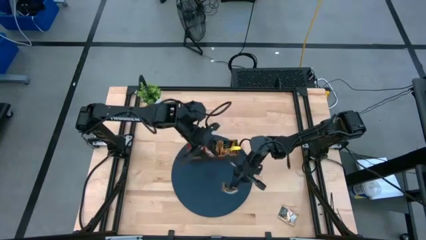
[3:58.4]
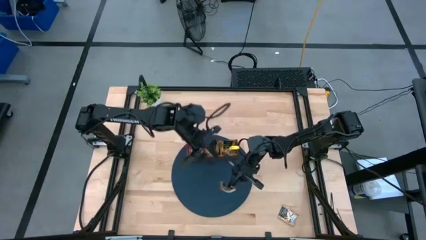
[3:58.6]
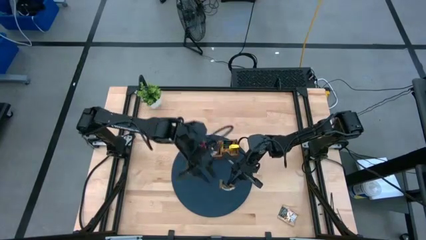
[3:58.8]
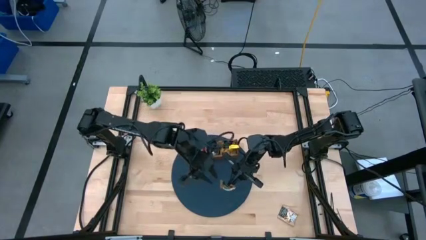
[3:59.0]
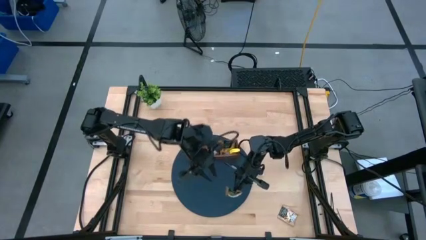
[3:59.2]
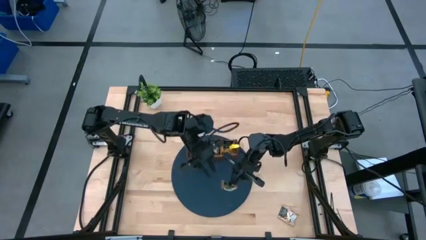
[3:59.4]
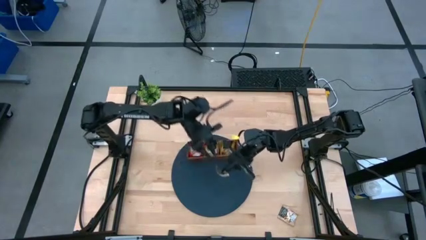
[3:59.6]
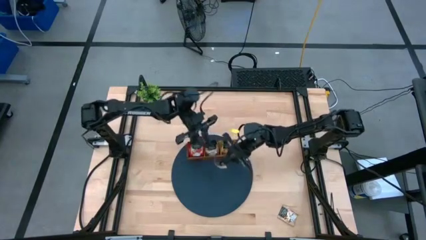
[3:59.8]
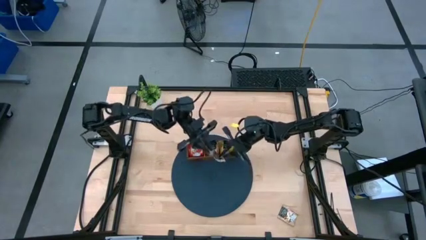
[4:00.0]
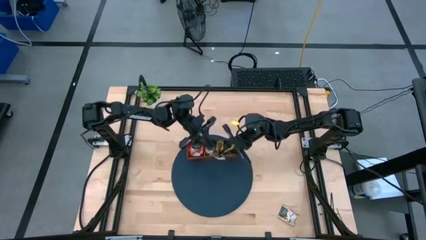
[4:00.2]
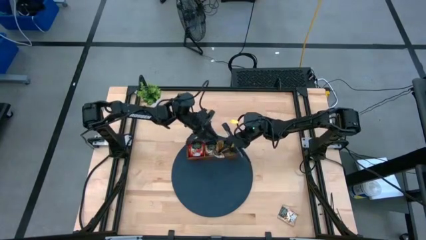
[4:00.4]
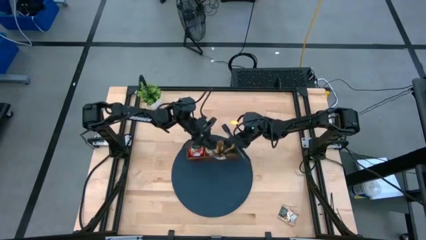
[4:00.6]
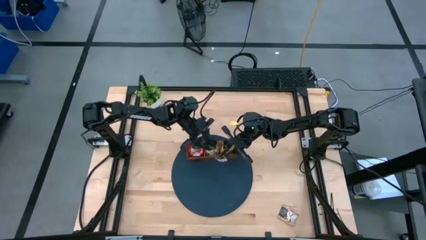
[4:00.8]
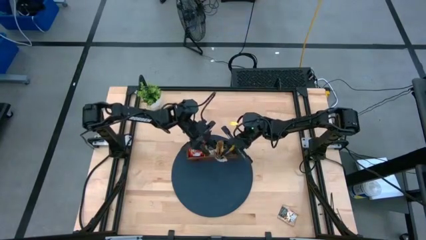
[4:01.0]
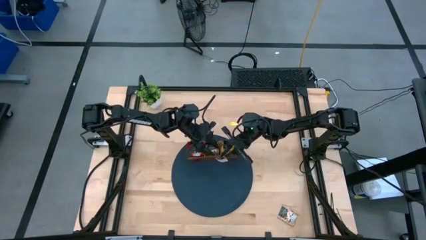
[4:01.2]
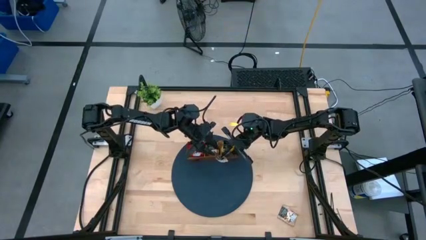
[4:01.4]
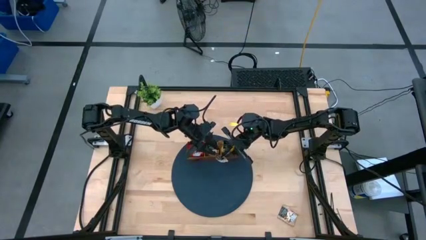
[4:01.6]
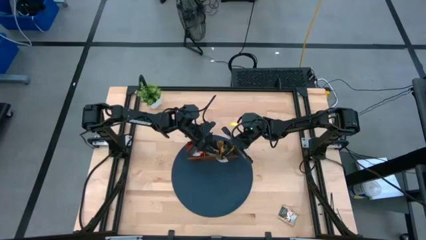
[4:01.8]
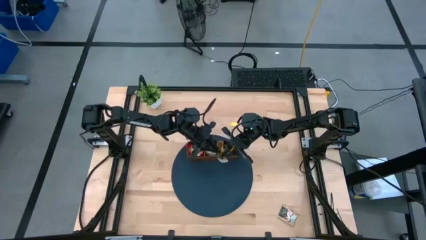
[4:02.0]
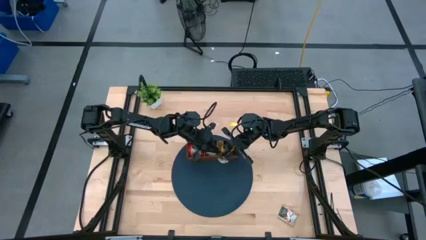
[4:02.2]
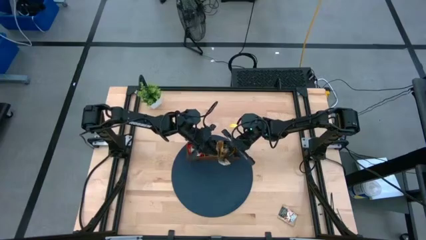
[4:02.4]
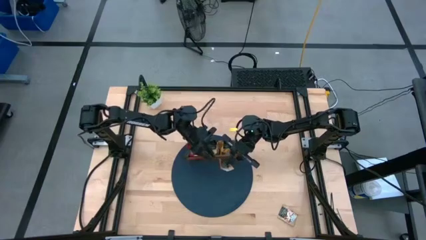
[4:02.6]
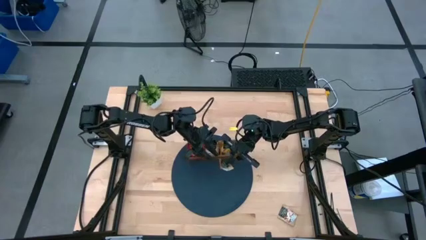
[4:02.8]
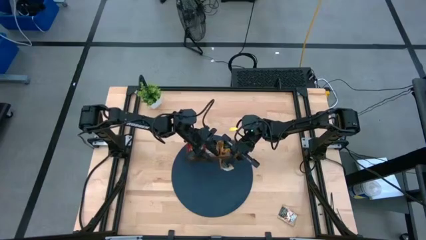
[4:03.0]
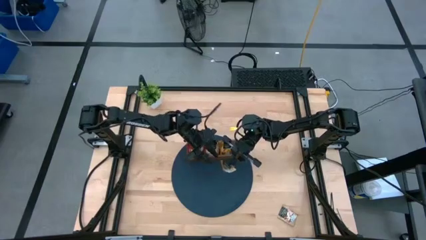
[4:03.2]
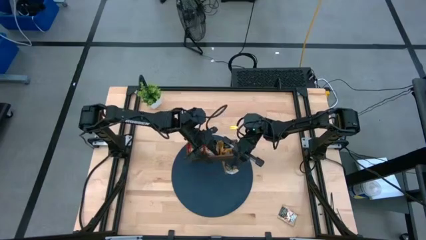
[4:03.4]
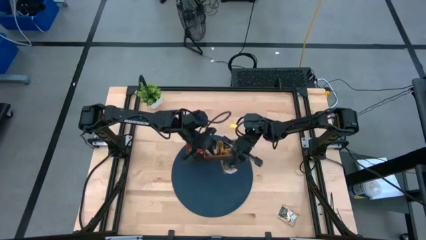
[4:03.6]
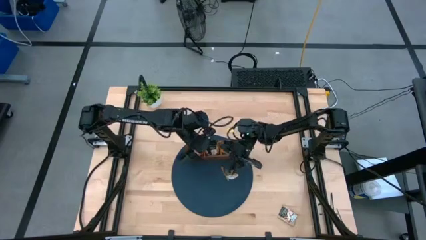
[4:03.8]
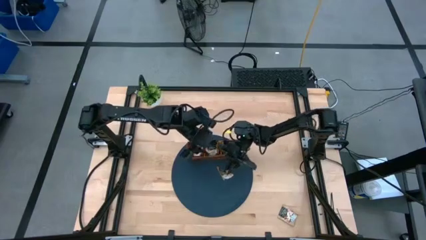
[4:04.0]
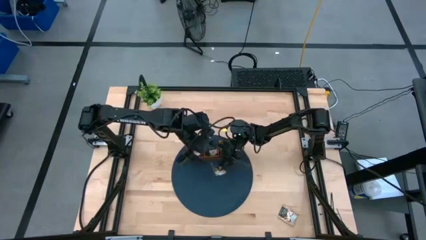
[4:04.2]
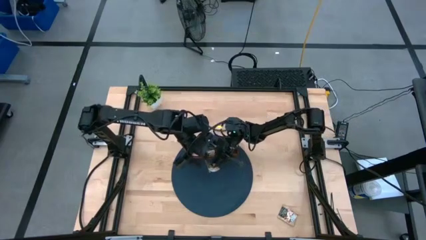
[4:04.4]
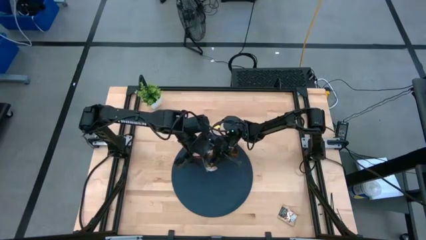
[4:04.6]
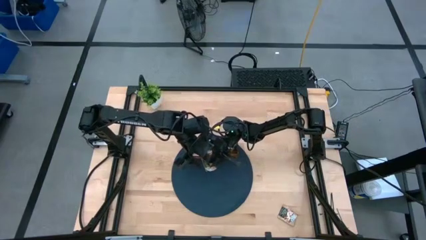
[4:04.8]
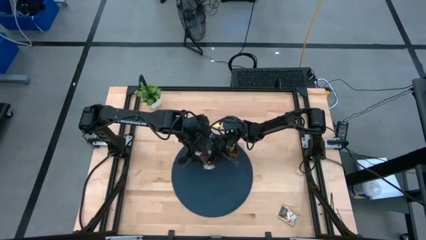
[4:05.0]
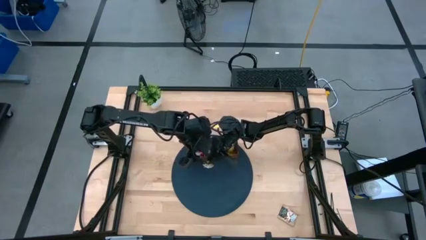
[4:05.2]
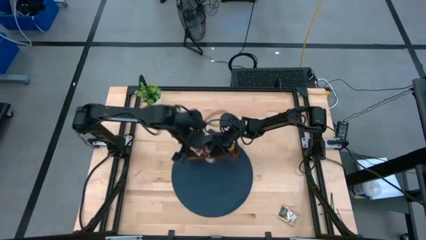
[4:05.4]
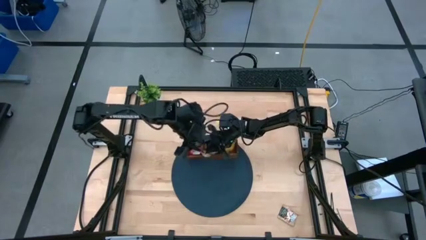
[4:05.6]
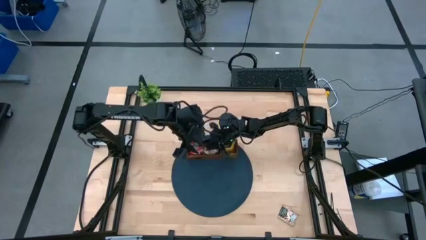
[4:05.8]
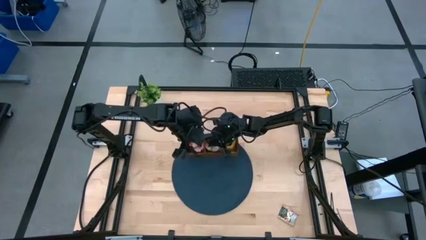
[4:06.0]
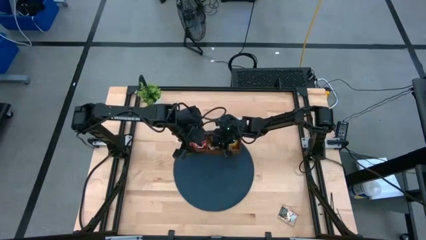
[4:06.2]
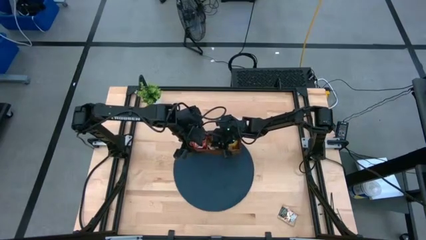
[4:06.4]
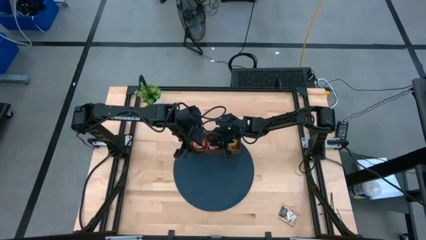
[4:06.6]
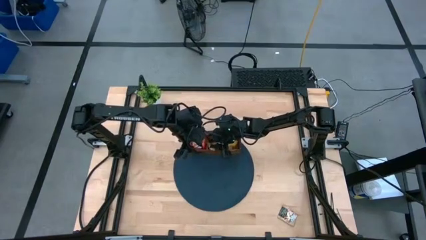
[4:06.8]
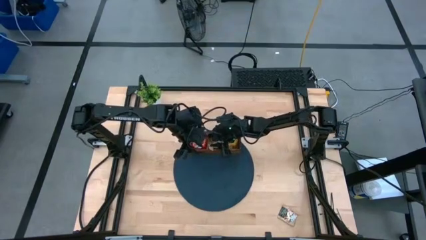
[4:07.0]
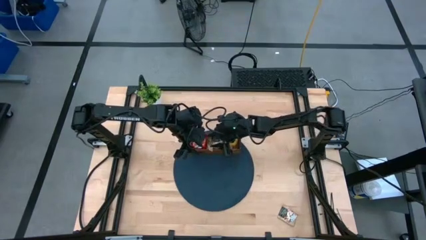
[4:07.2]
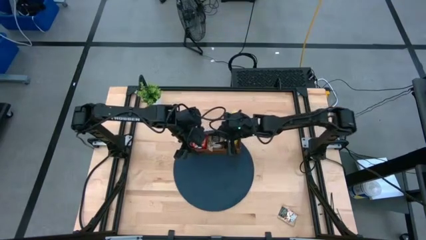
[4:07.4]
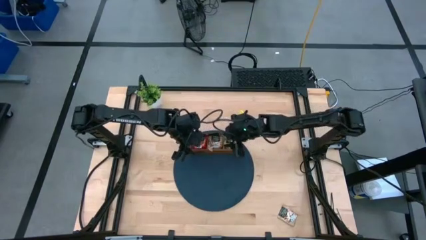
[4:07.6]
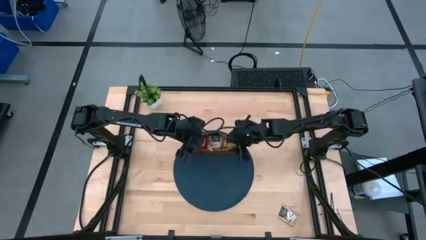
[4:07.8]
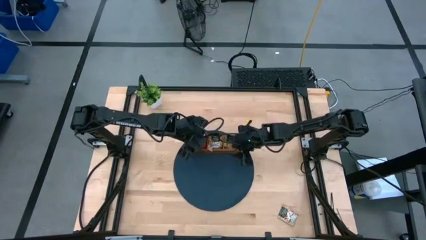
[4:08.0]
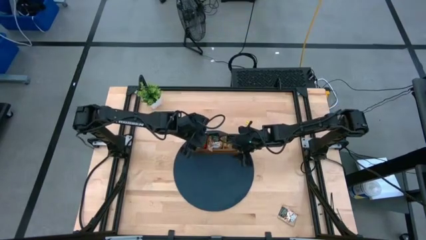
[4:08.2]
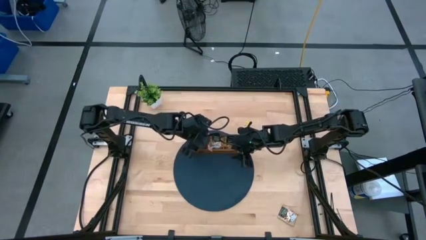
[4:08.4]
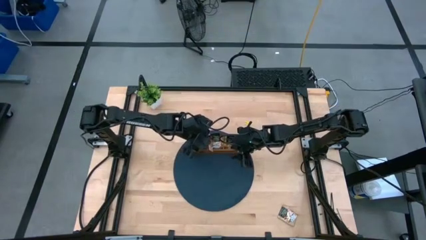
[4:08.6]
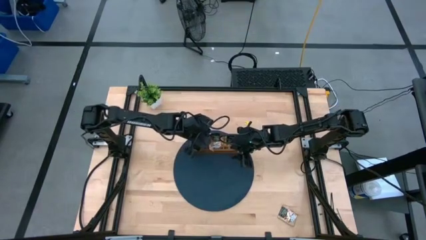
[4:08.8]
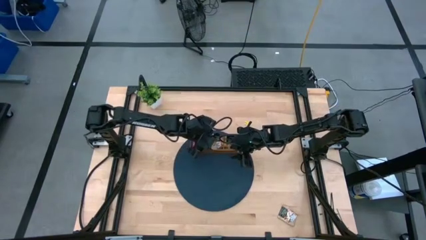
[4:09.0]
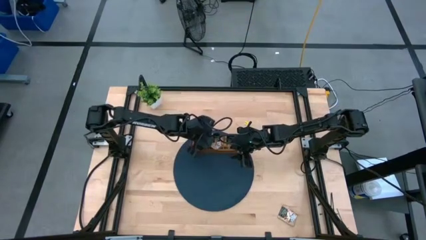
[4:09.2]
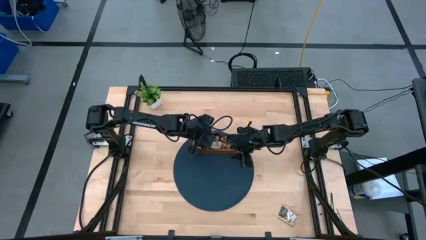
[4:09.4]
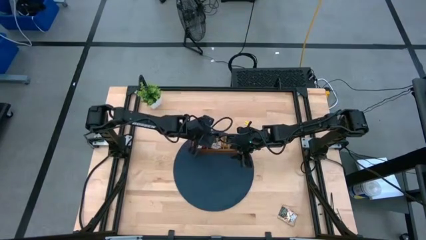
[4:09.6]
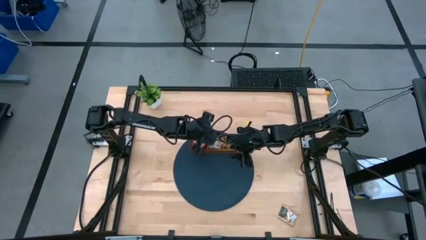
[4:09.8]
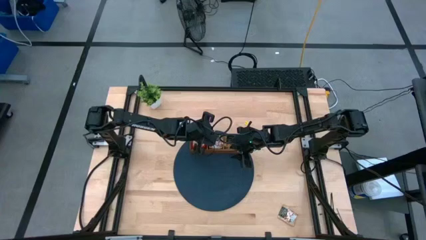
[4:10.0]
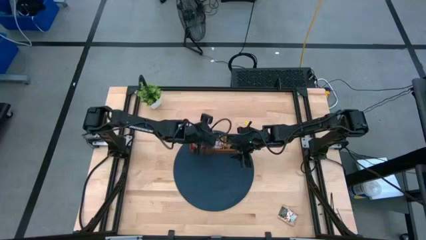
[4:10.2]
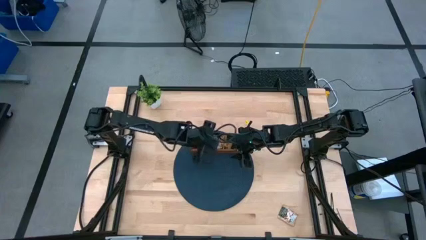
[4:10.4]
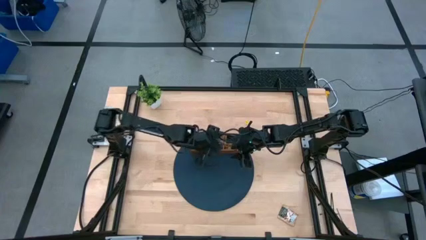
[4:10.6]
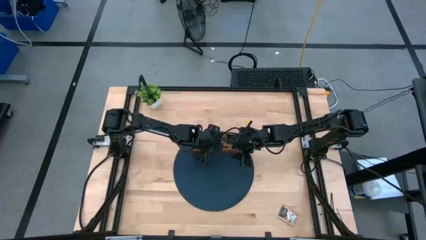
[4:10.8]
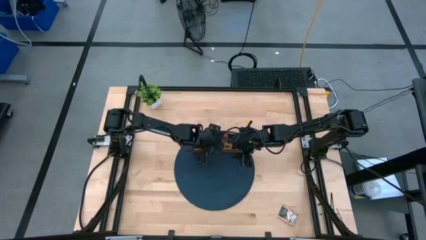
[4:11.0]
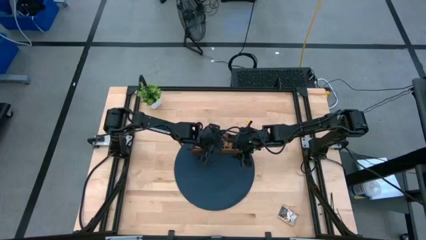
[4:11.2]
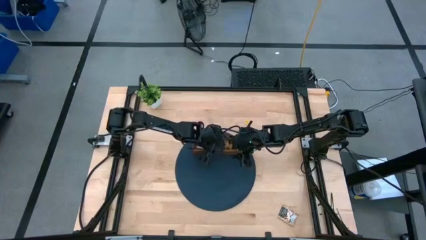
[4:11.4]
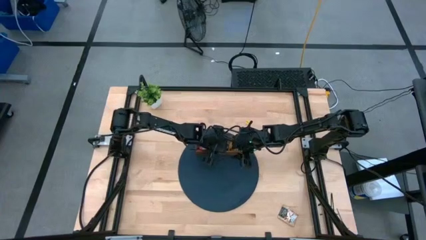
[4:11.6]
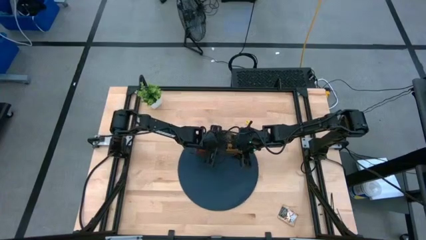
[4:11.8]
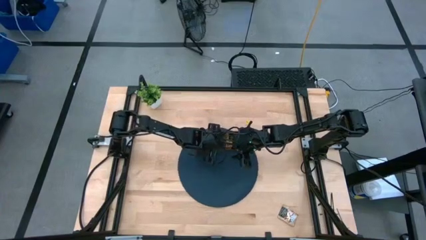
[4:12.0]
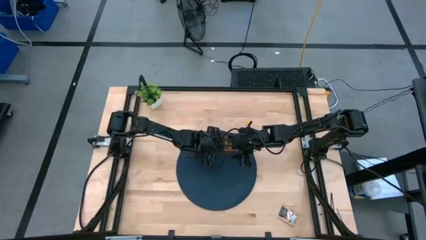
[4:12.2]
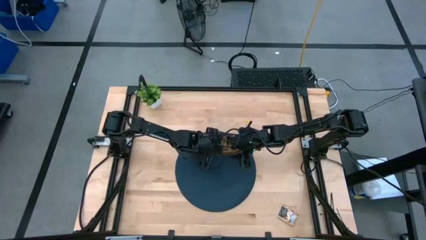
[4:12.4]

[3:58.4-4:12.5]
Task: Pick & Place Tea
Put the left brown tea bag into the middle section of the wooden organizer

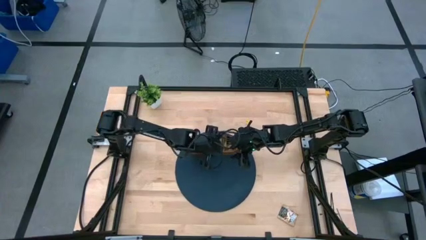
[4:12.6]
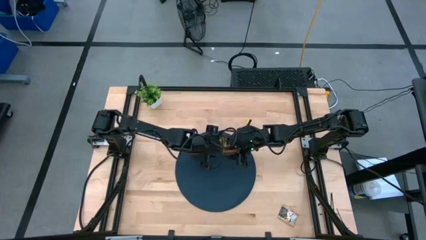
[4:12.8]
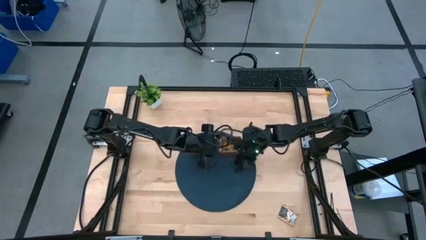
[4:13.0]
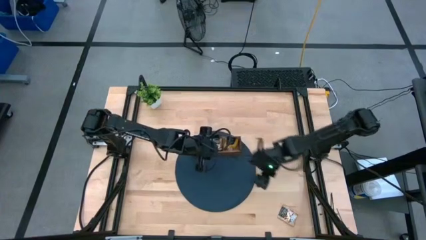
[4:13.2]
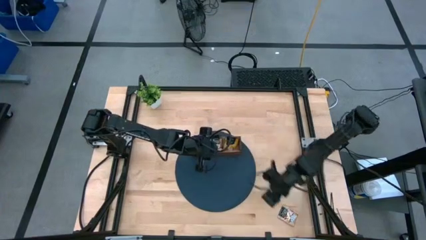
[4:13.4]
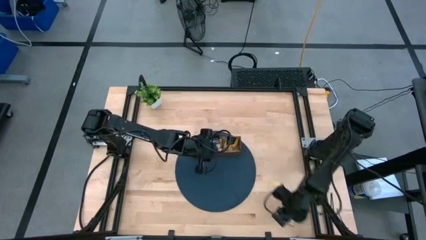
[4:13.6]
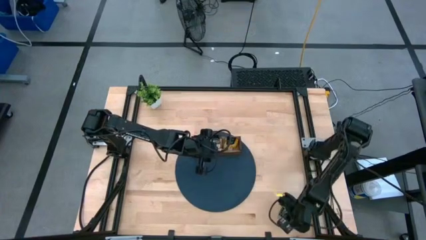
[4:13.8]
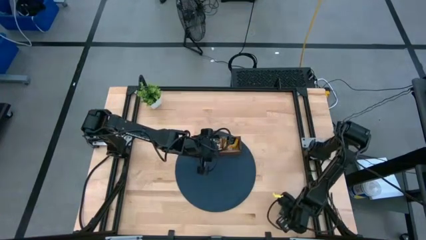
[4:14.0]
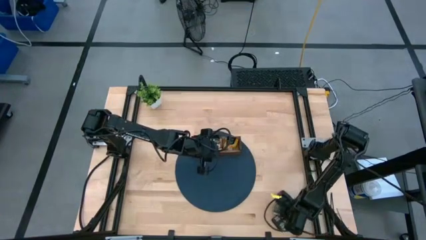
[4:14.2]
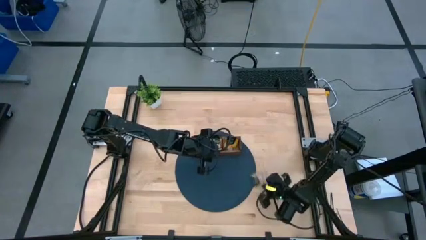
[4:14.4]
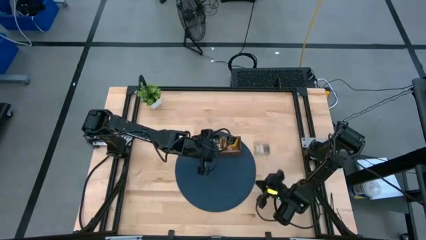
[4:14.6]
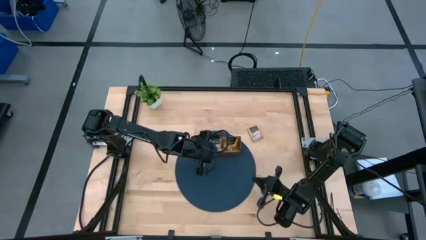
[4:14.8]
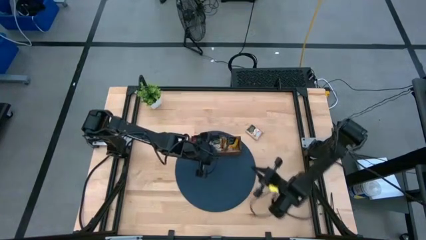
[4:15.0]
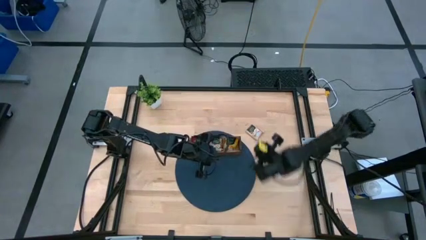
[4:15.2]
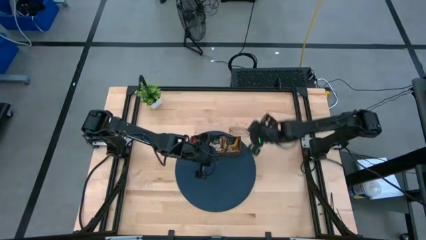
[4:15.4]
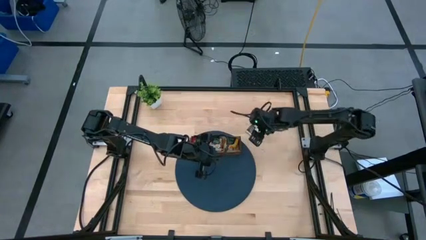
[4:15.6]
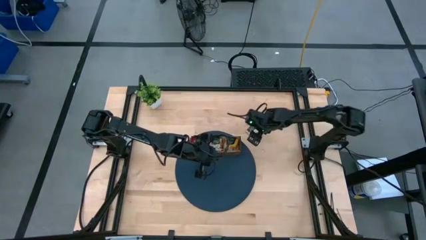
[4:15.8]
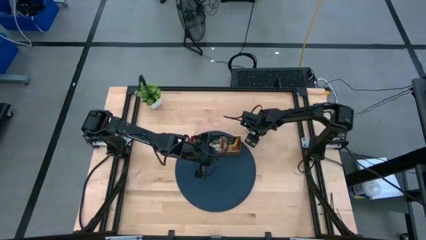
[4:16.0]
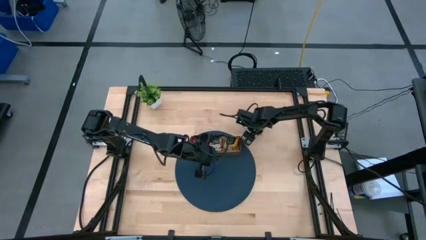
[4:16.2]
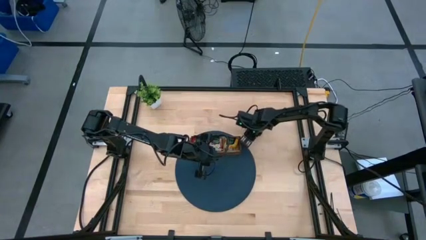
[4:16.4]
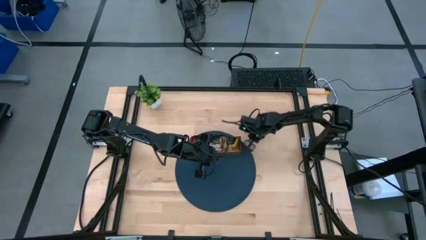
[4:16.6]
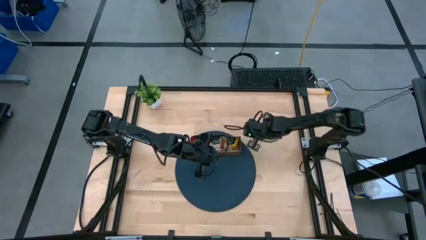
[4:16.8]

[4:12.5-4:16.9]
Put the brown tea bag into the middle section of the wooden organizer
